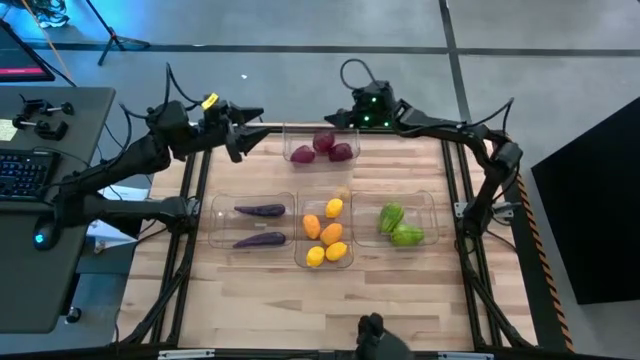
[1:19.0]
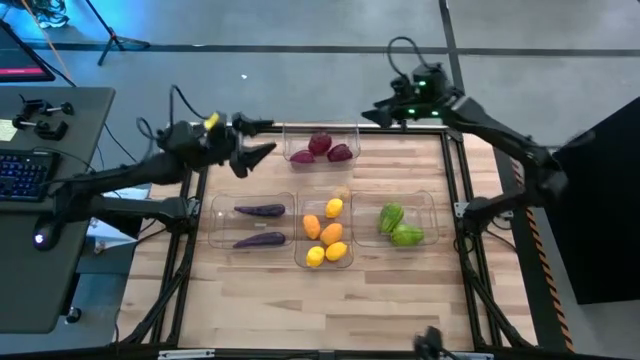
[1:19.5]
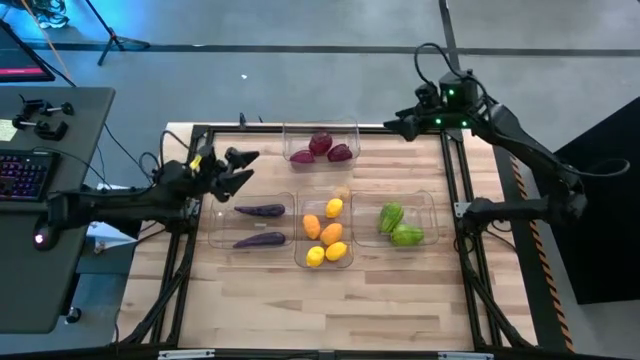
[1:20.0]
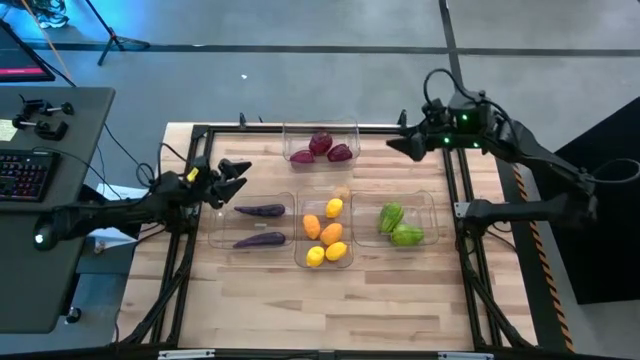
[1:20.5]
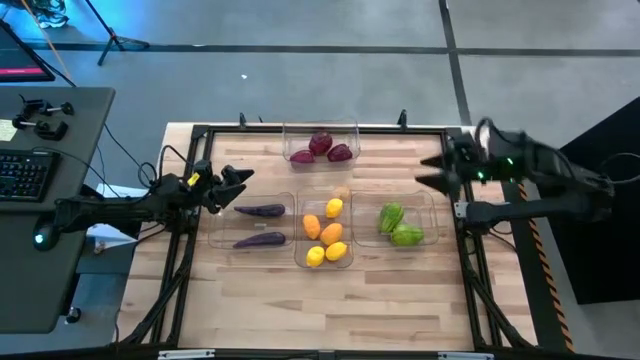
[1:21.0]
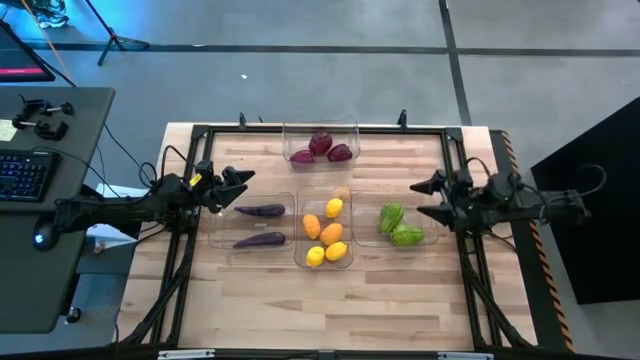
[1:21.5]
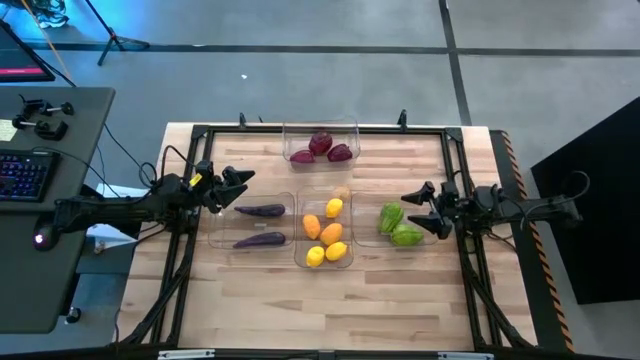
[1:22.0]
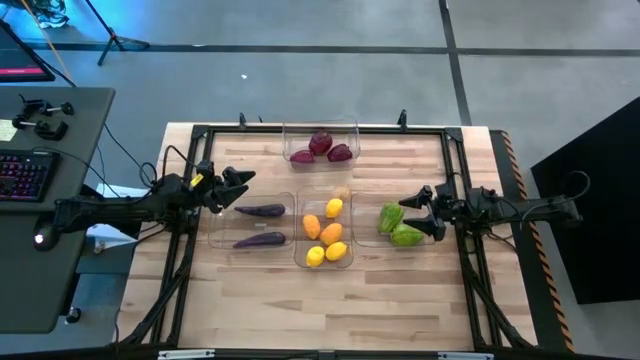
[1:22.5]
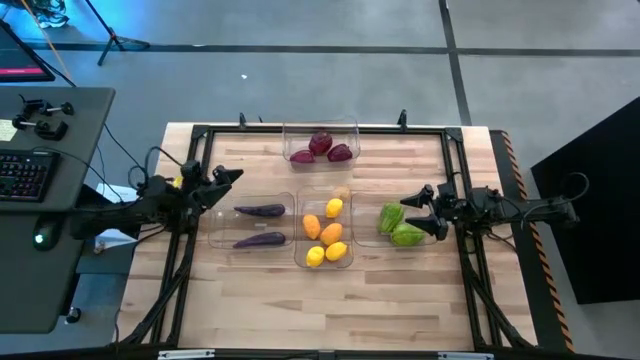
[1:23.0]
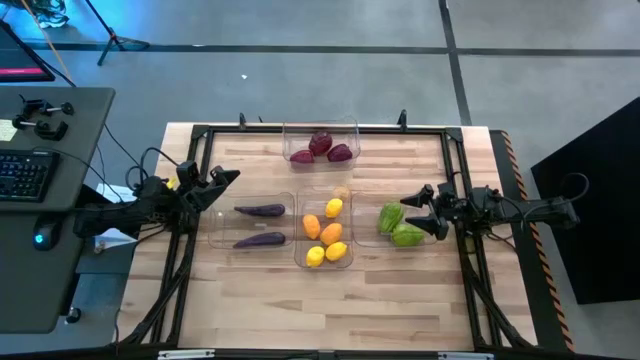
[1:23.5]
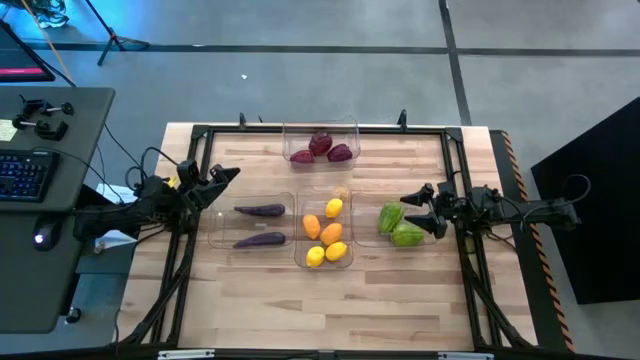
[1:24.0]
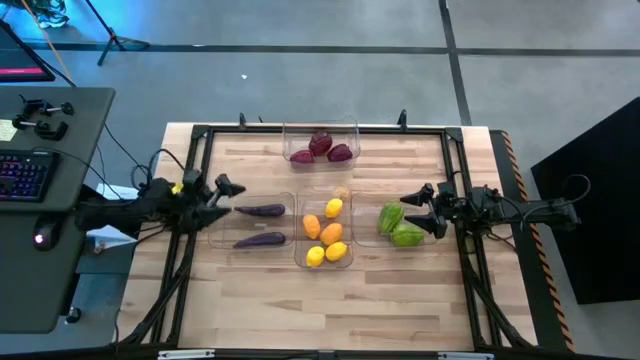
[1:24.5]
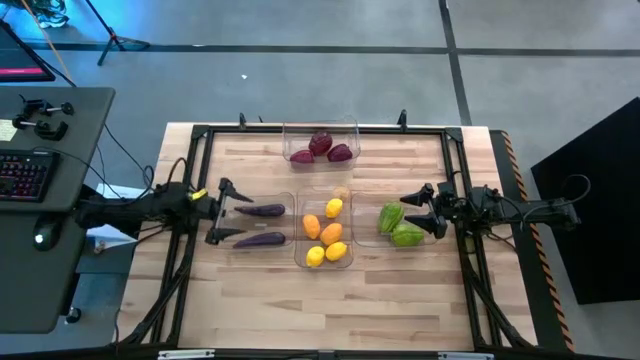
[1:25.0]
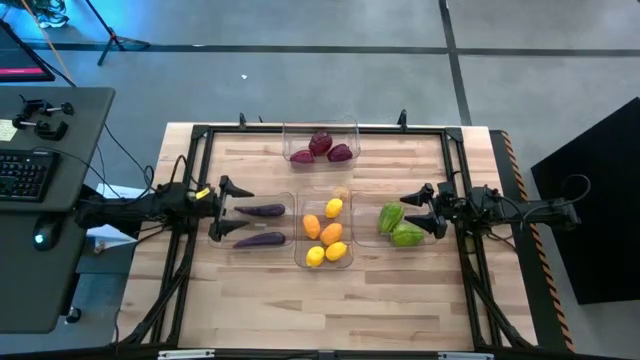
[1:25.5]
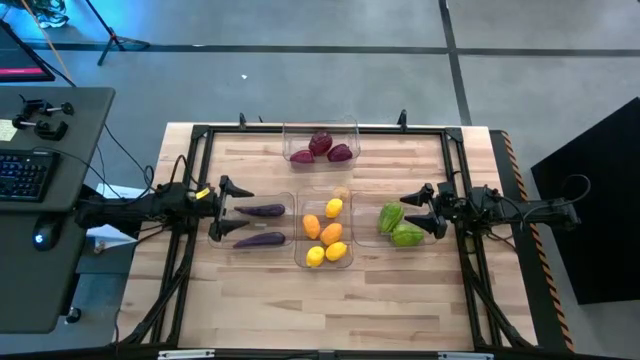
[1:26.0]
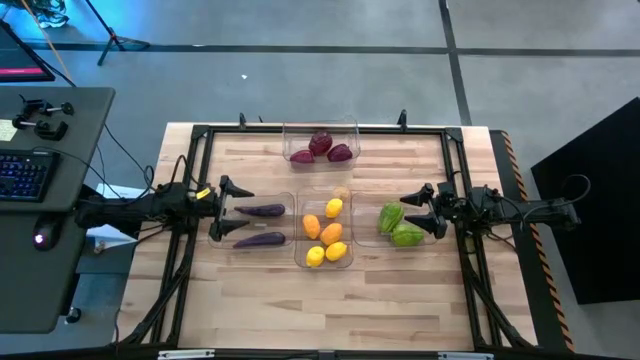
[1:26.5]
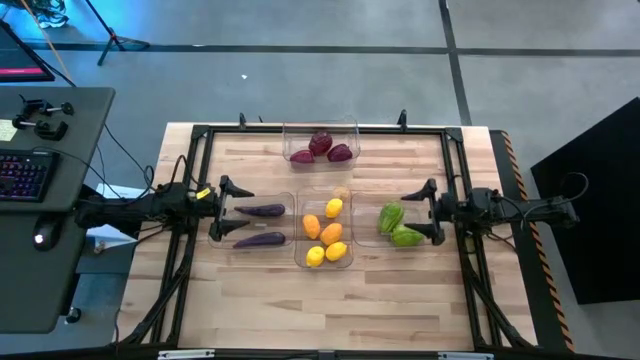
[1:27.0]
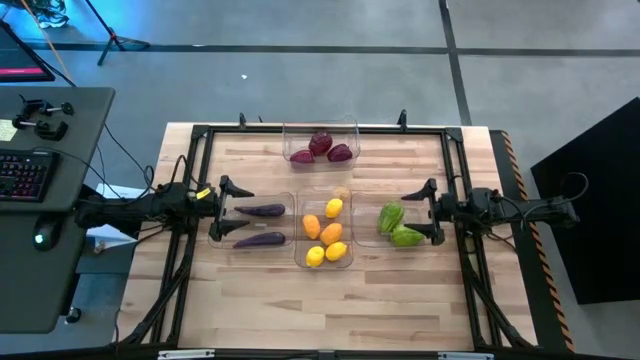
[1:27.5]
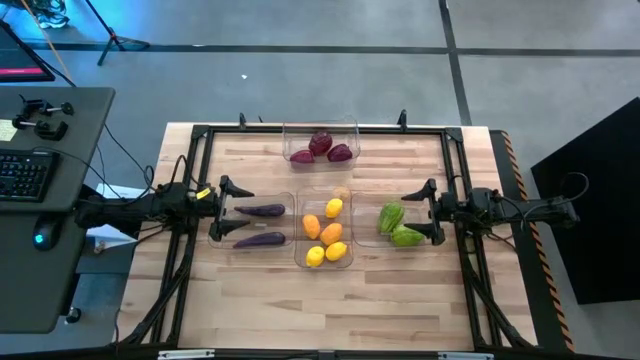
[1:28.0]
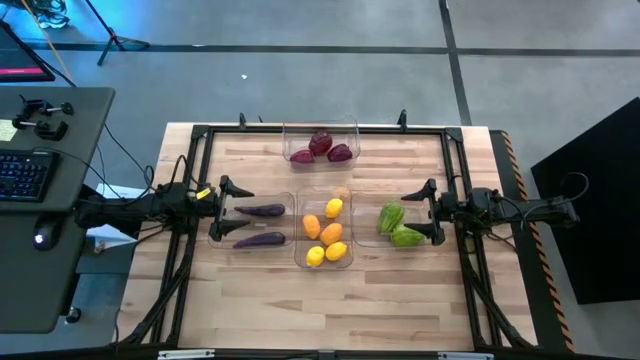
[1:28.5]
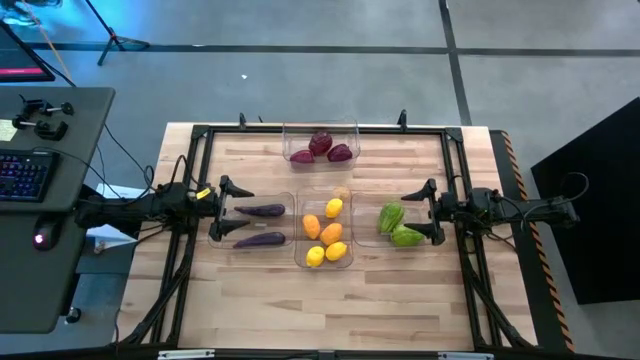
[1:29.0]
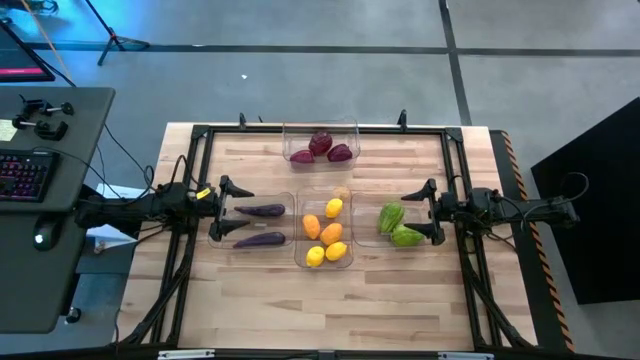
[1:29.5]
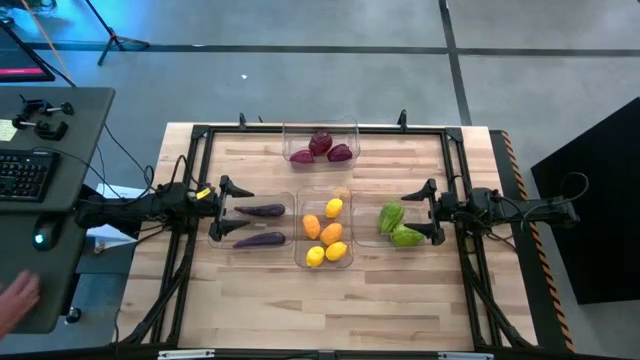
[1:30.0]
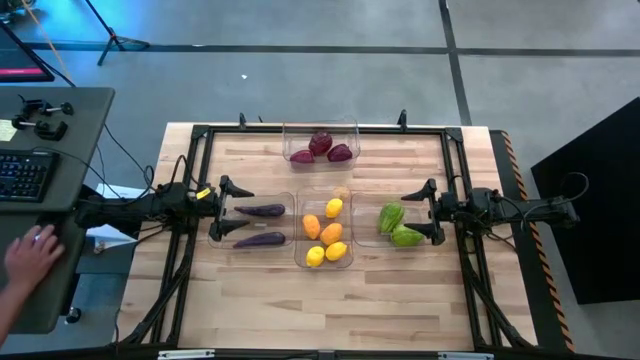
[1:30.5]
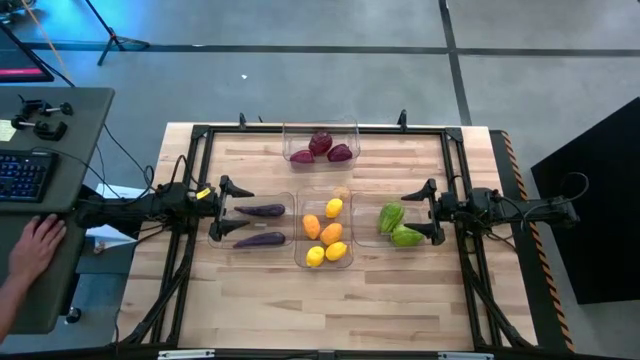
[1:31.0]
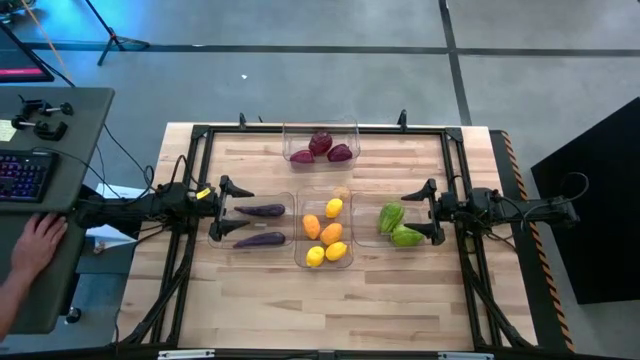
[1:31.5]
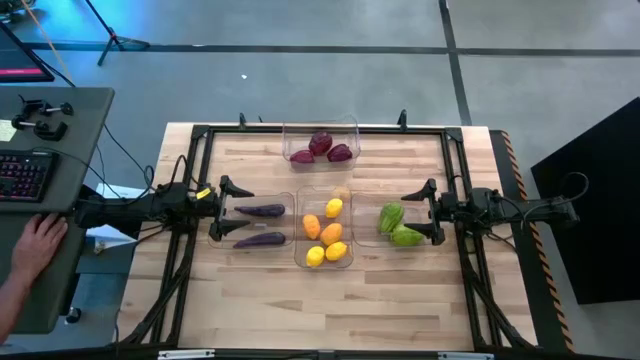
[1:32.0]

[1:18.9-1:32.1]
Task: Sort produce into baskets
Return to Home Position

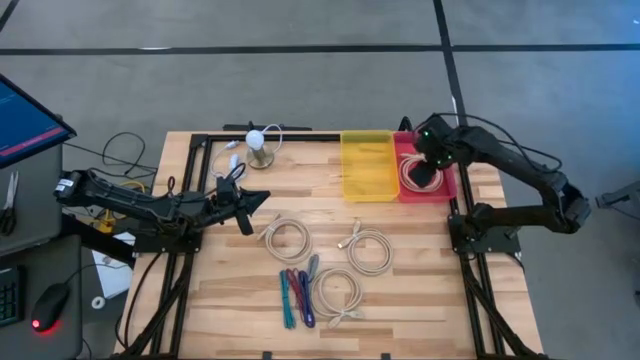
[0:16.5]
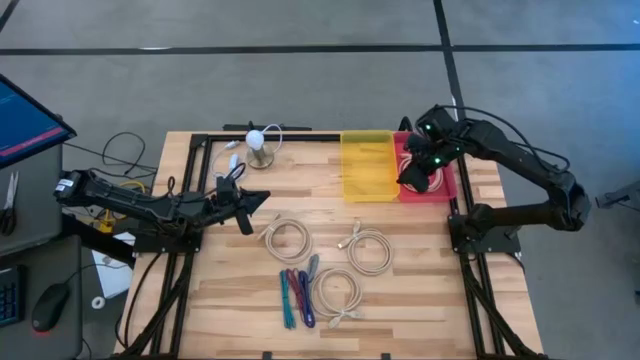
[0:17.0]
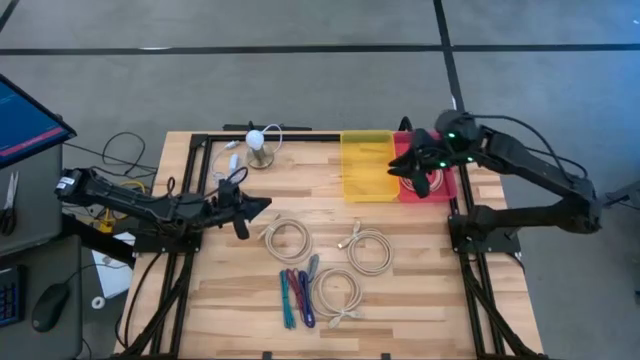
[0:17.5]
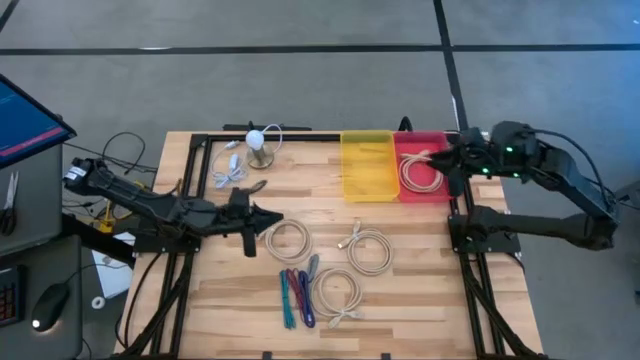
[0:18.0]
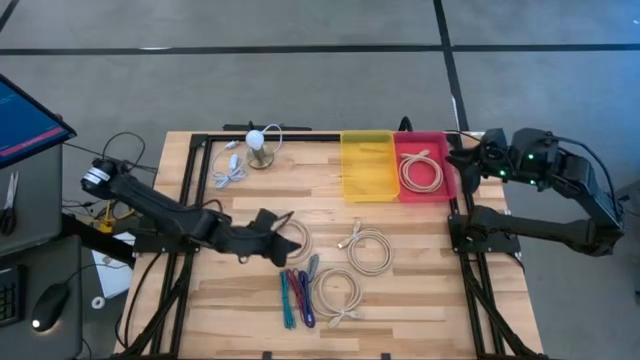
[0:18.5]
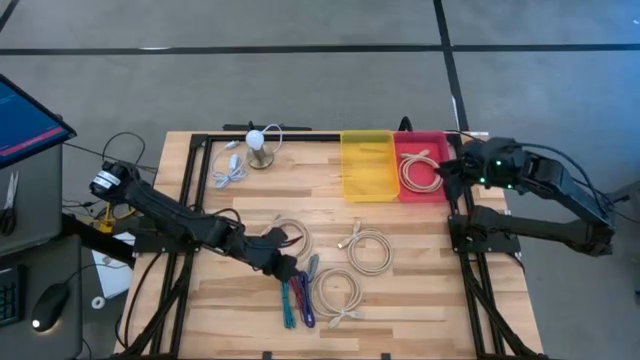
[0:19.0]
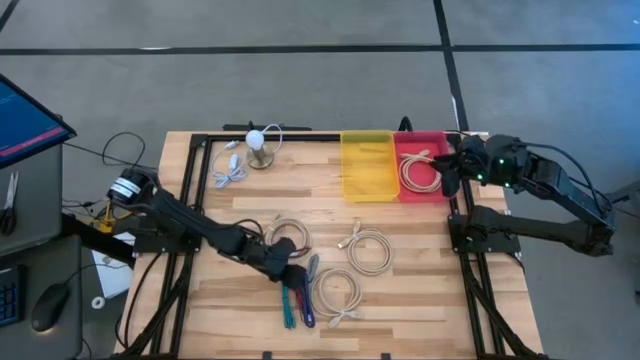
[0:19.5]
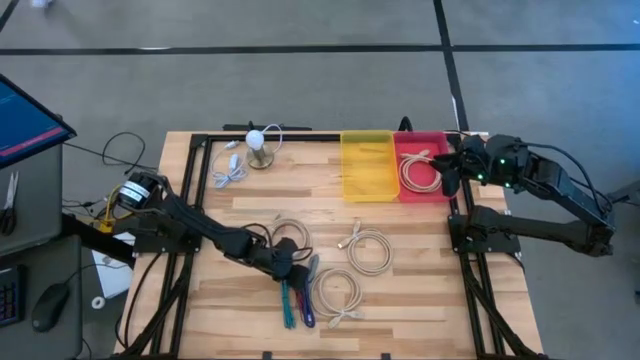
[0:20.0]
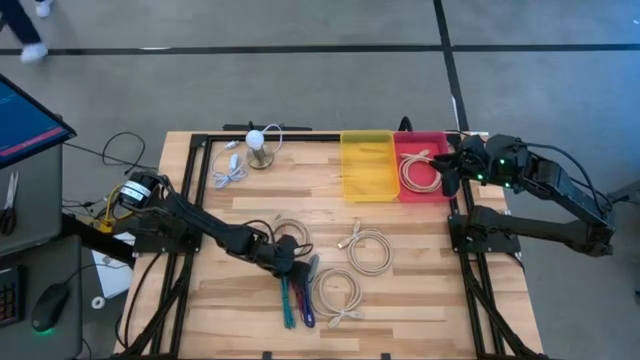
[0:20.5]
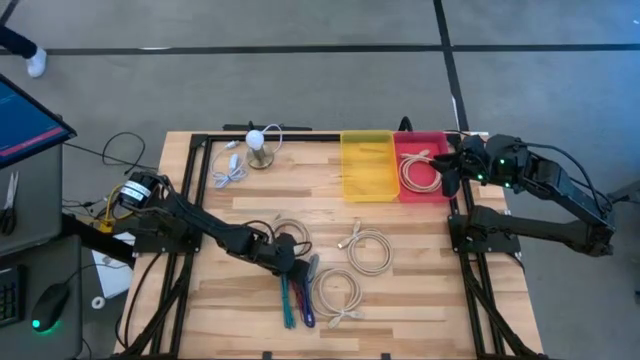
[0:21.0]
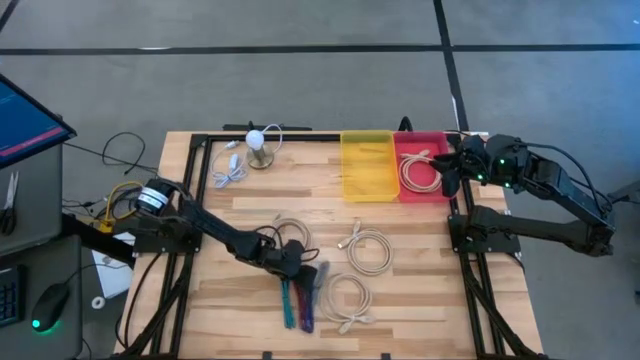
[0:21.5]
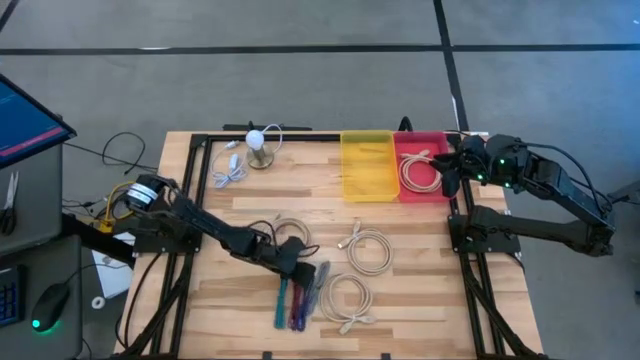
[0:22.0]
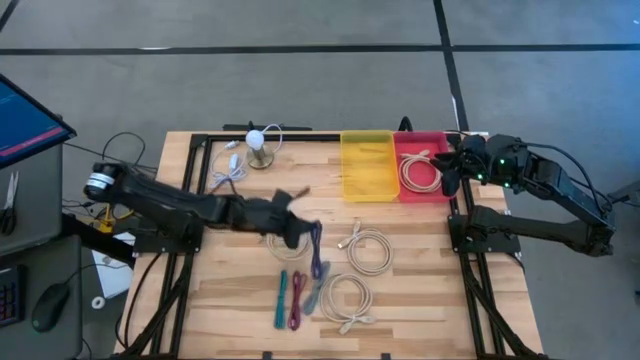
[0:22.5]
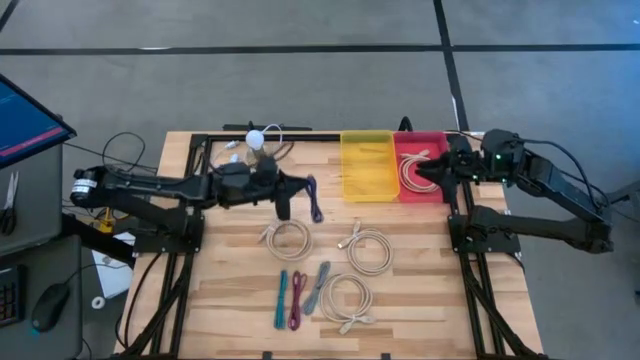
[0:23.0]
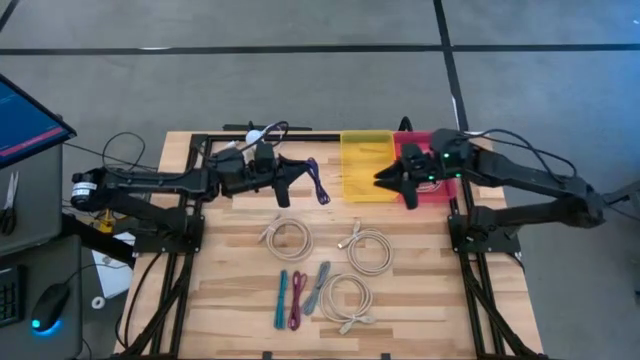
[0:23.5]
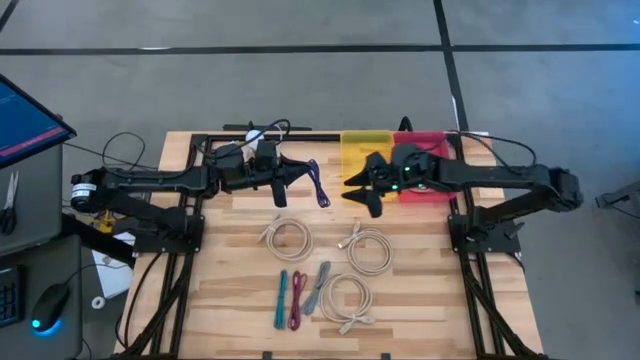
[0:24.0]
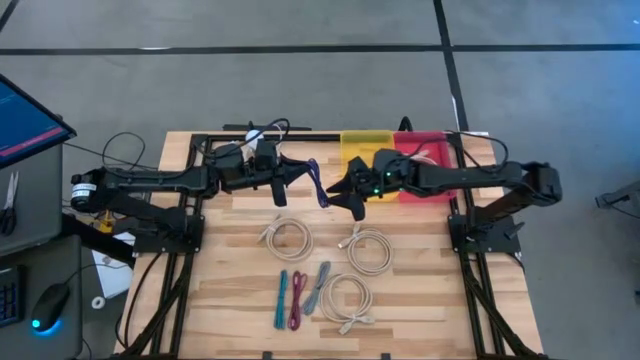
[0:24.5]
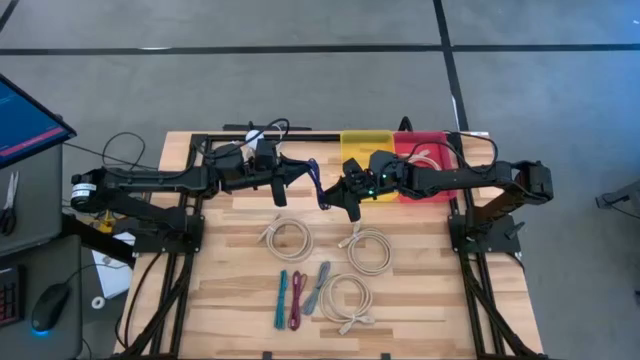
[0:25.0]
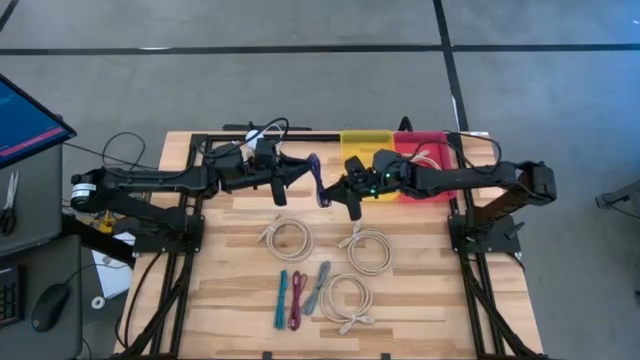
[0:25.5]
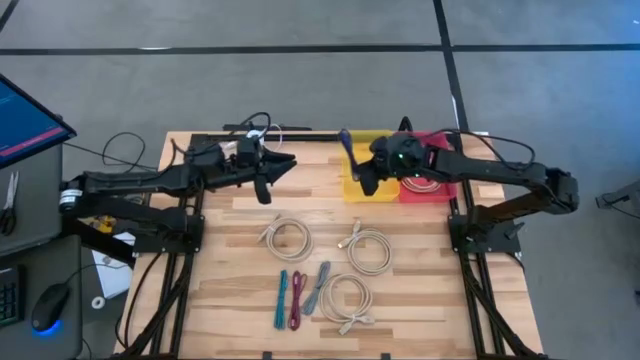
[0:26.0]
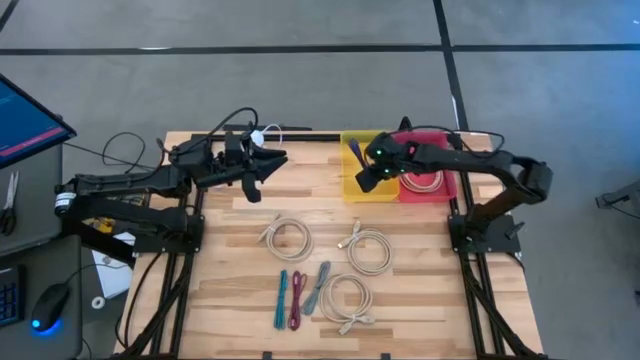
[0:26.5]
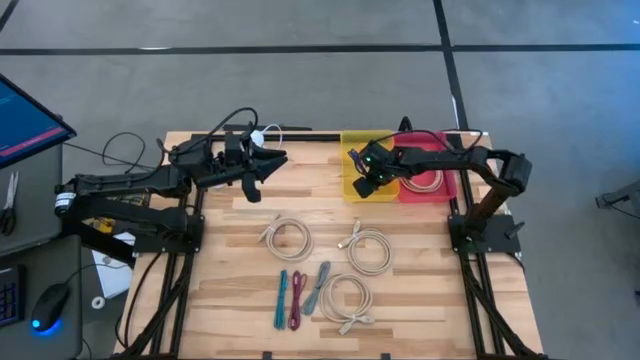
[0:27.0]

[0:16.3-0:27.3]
Task: Pick & Place USB Port
Put the purple charger cable into the yellow bin
